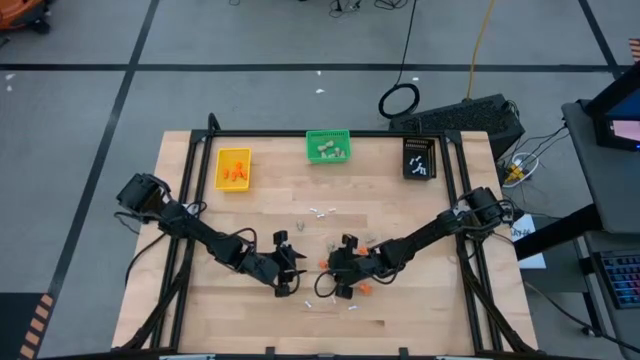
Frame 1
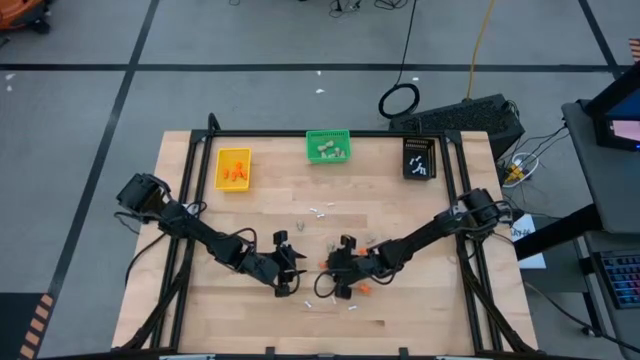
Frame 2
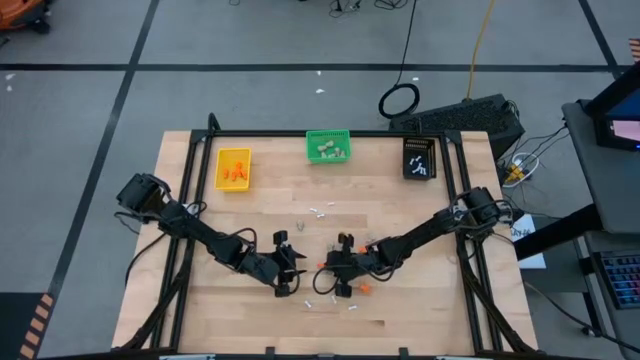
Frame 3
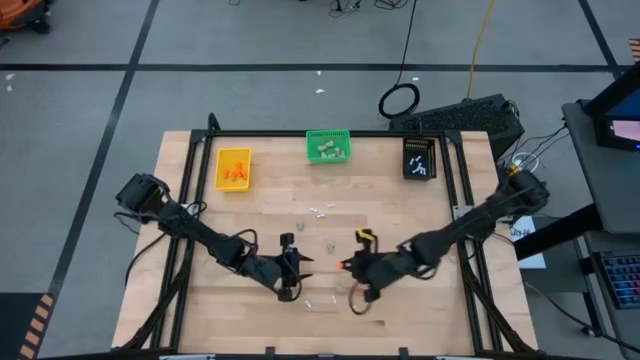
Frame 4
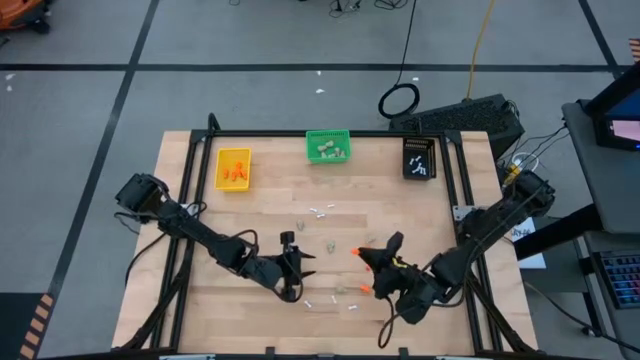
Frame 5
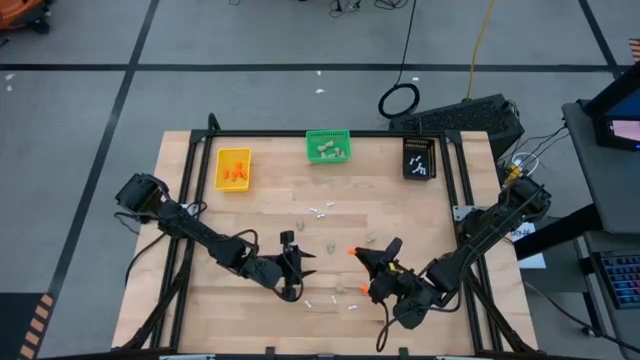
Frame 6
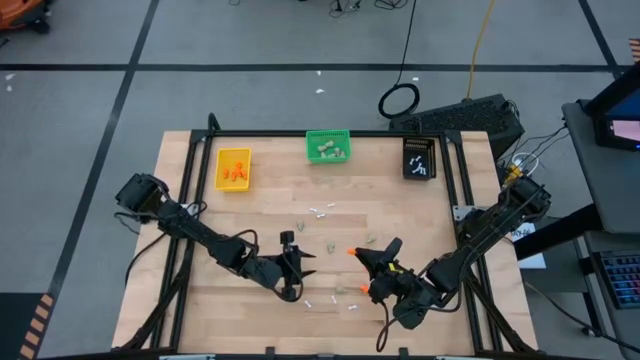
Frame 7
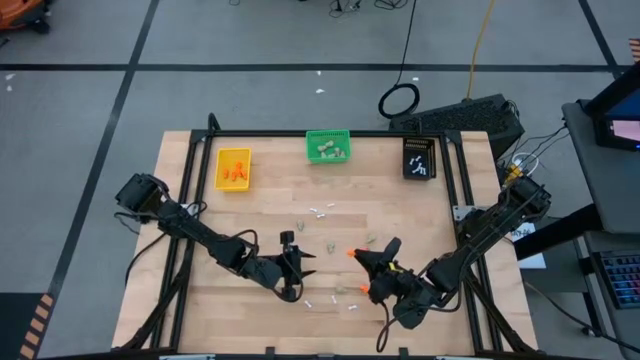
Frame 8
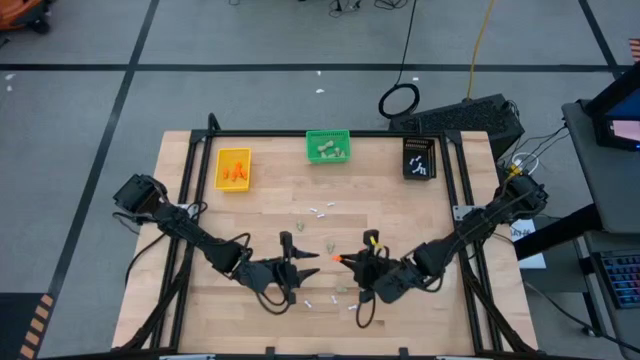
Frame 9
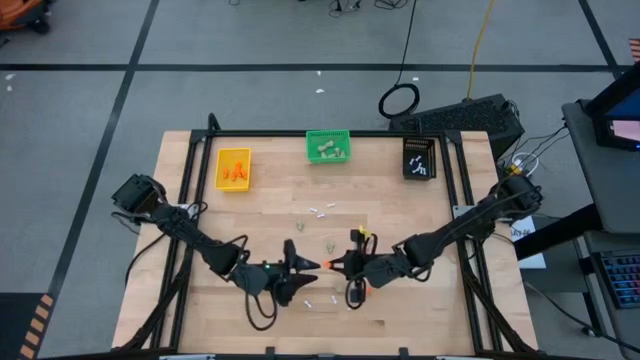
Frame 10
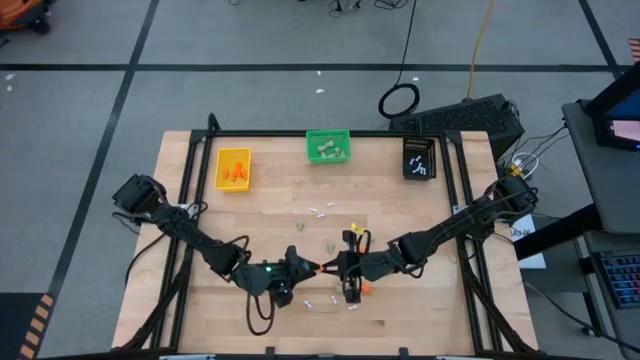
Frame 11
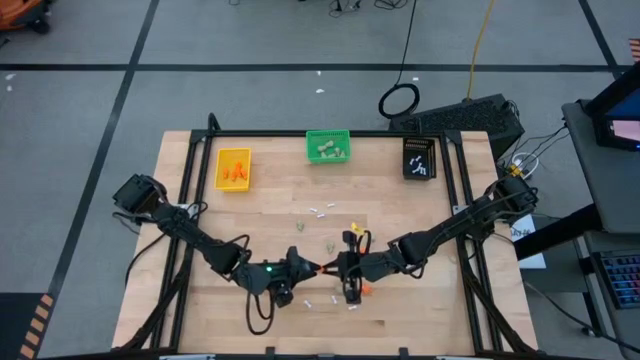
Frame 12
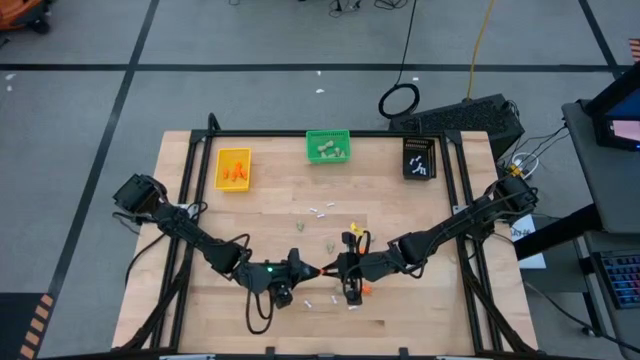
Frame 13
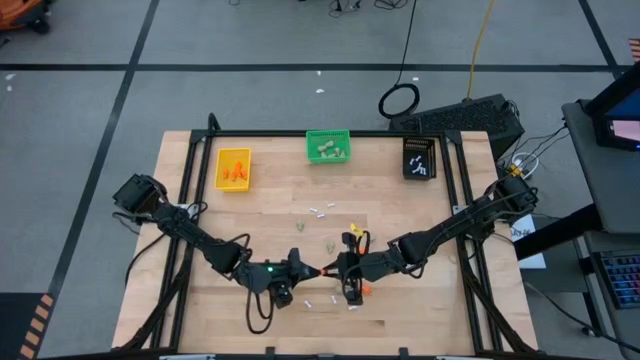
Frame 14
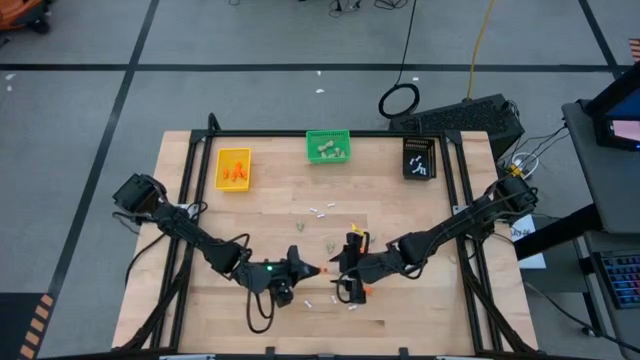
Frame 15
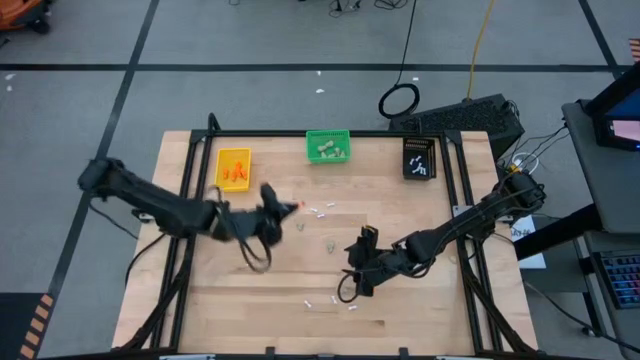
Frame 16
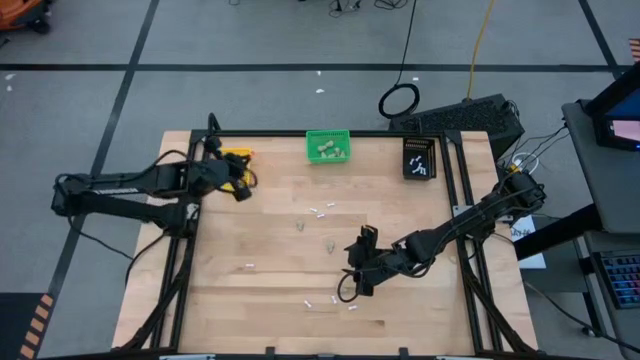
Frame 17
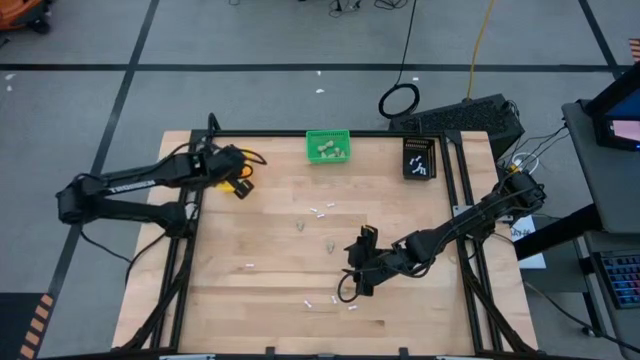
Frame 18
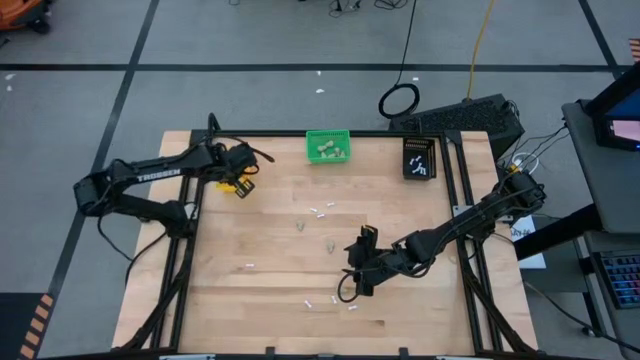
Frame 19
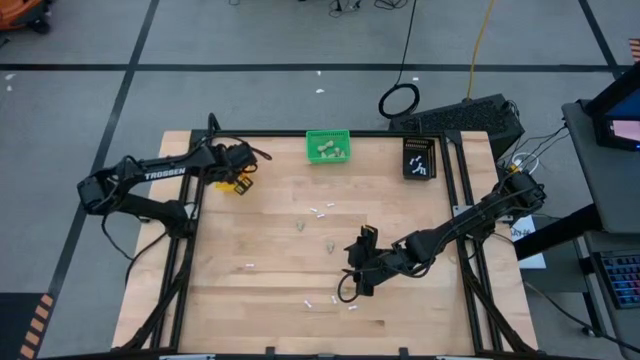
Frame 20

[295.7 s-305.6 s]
Task: Sort Halloween decoration
Put the orange skeleton toy into the yellow bin

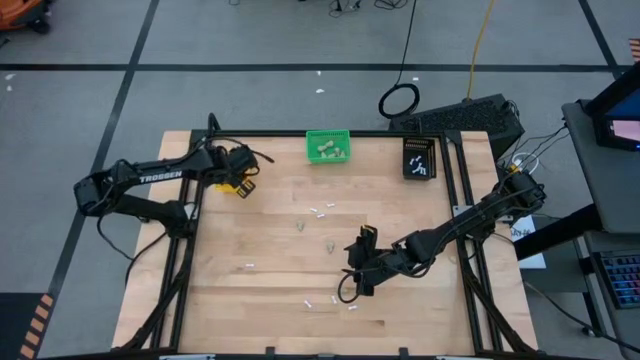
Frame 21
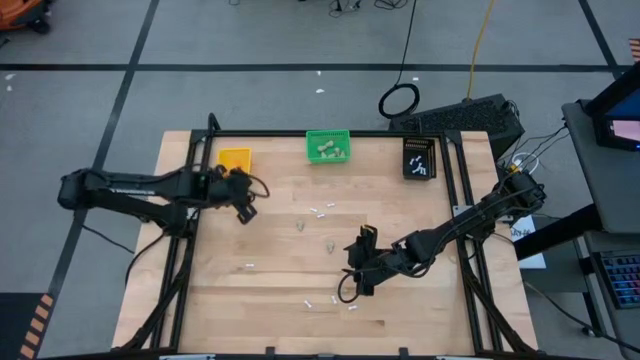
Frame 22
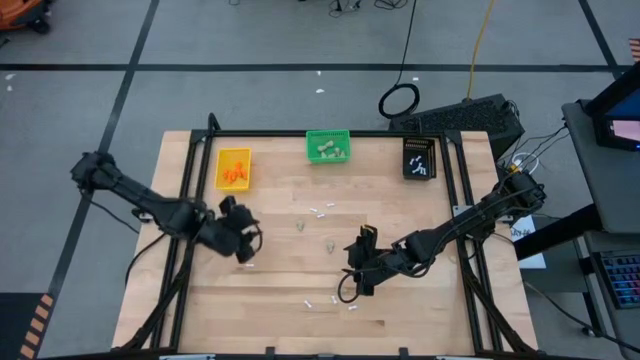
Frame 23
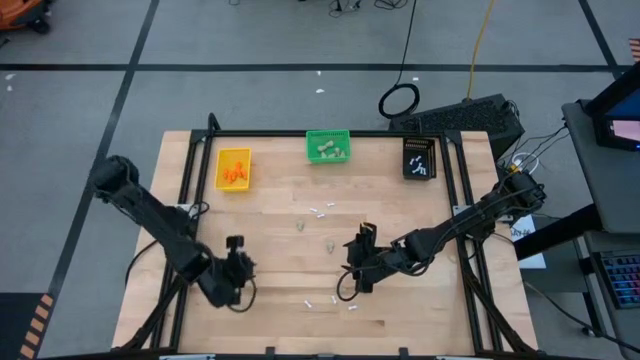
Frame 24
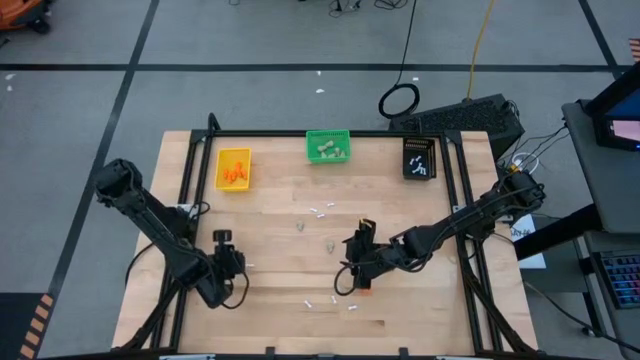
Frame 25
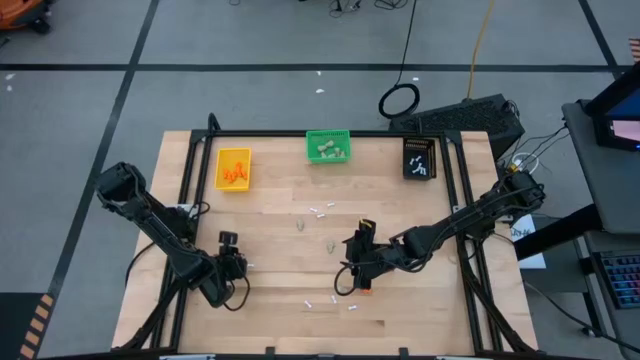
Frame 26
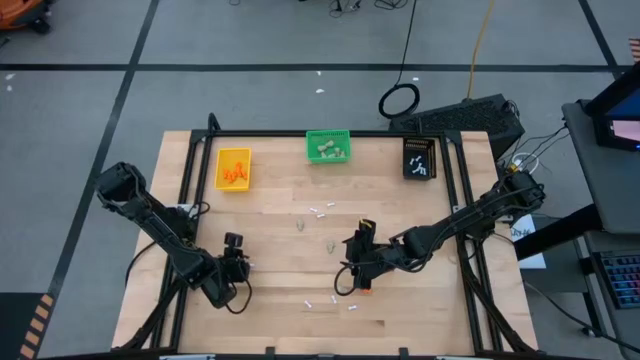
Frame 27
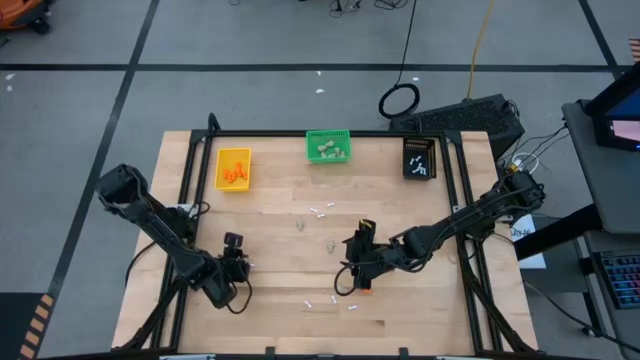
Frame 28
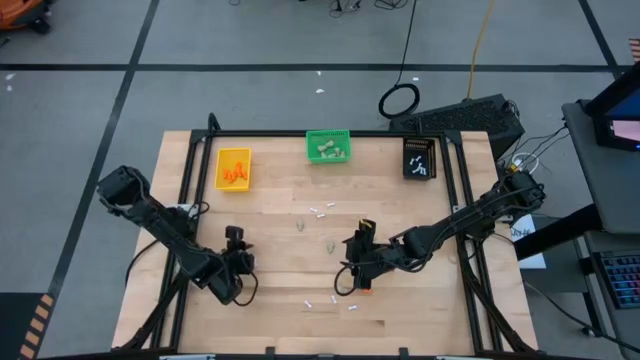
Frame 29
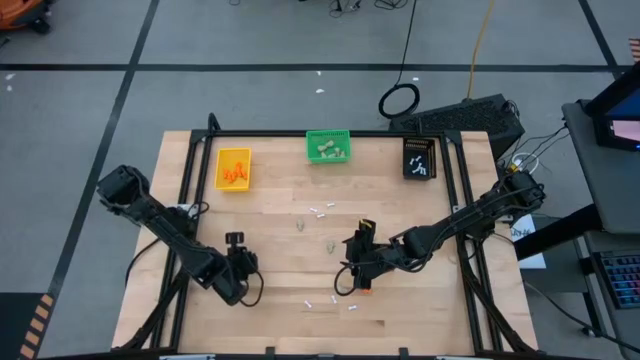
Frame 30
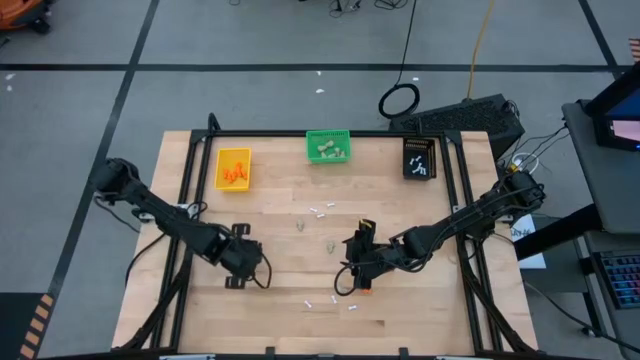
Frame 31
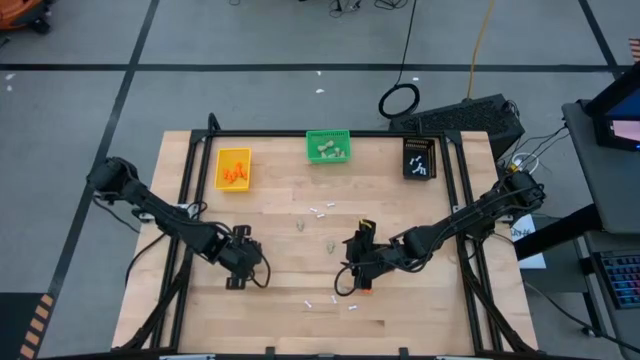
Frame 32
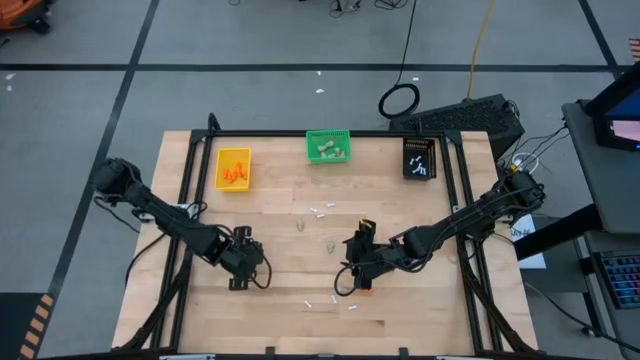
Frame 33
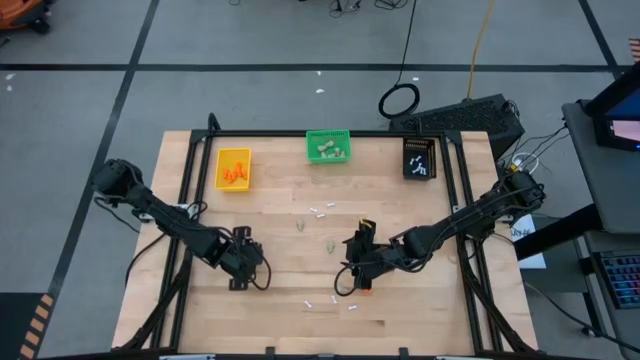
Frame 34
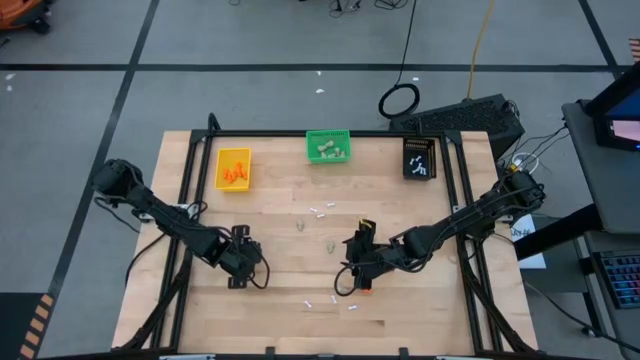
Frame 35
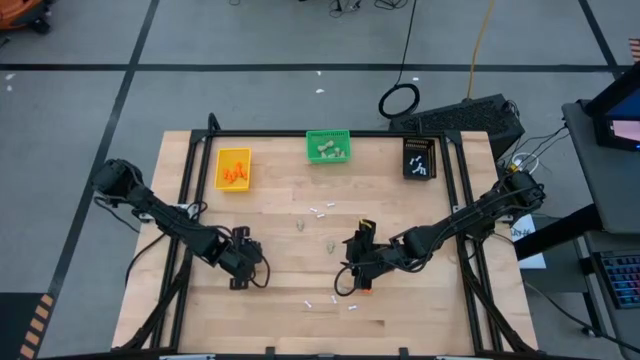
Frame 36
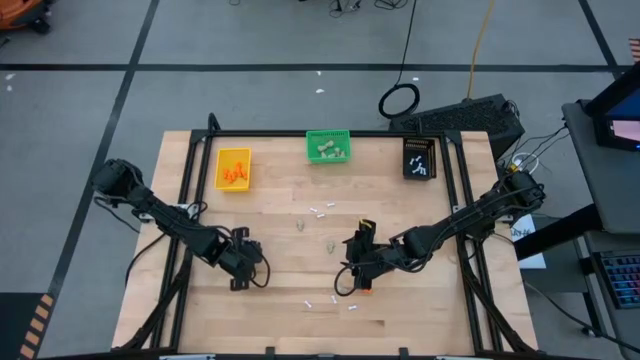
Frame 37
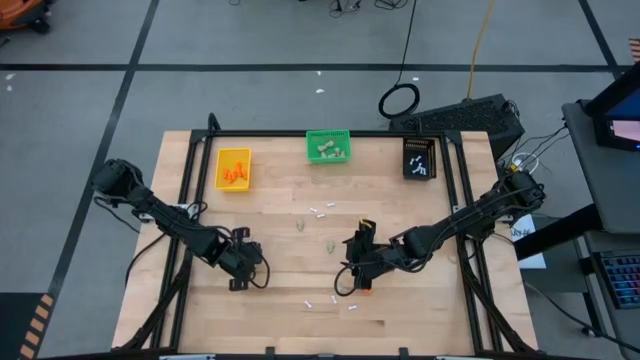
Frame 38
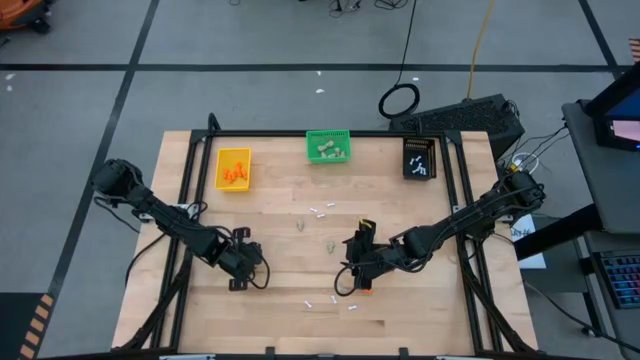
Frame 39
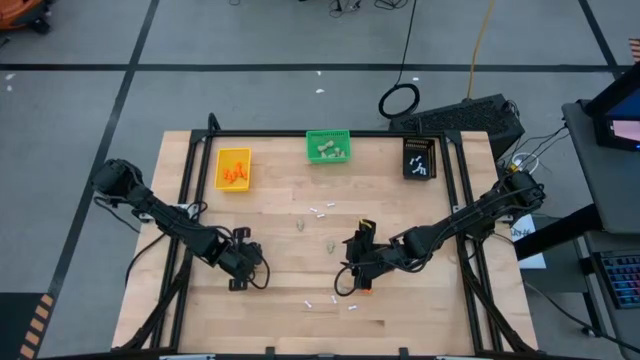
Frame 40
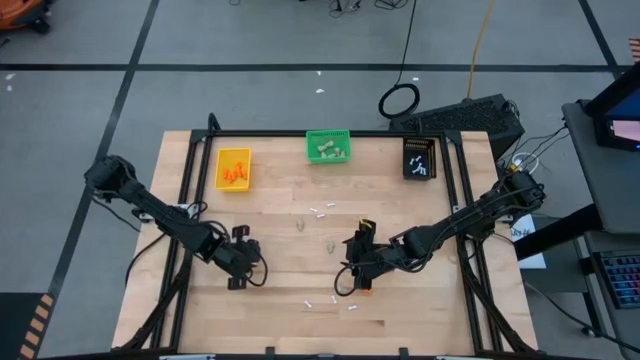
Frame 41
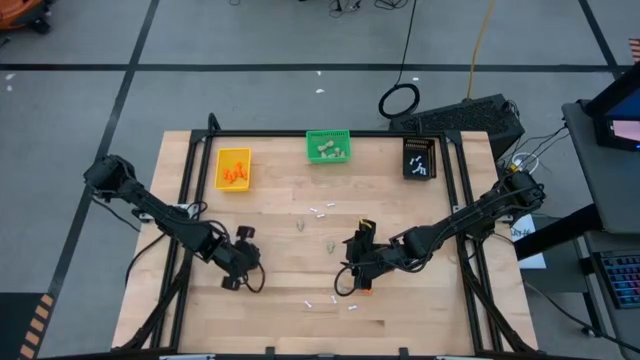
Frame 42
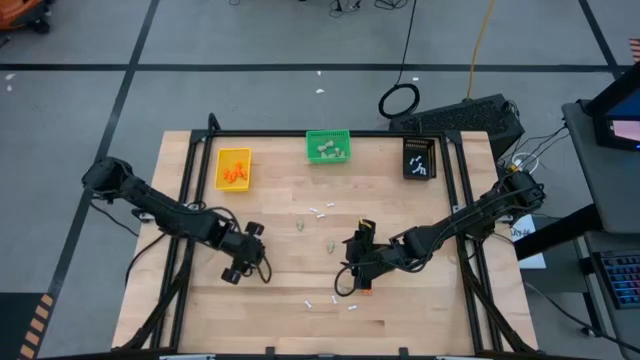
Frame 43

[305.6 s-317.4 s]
Put the white bone toy into the black bin
